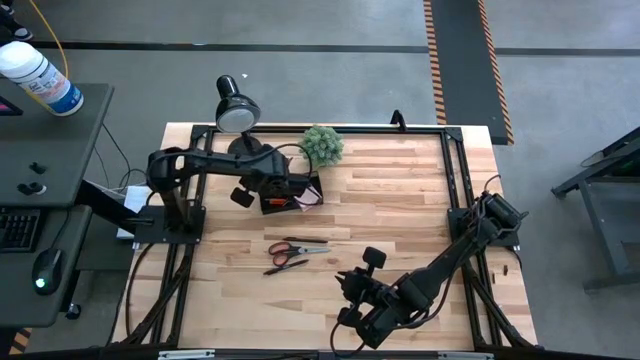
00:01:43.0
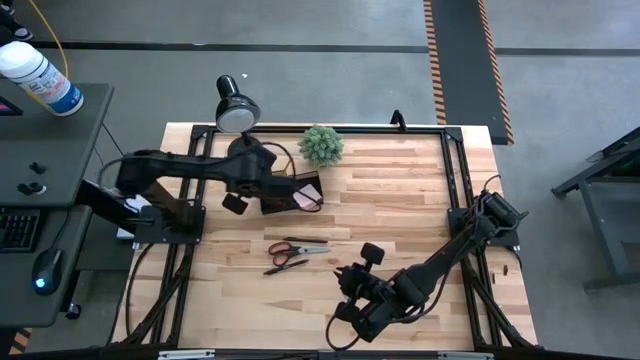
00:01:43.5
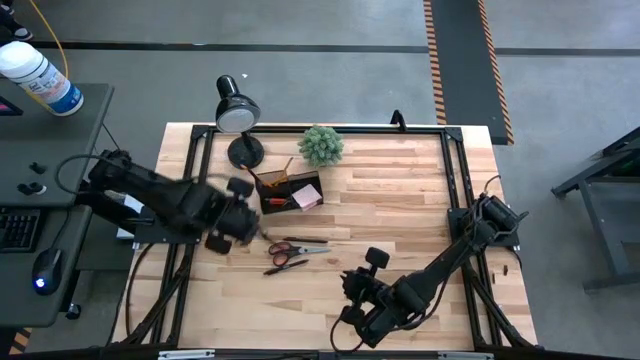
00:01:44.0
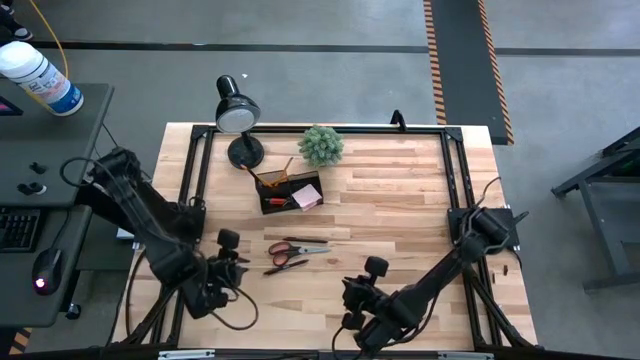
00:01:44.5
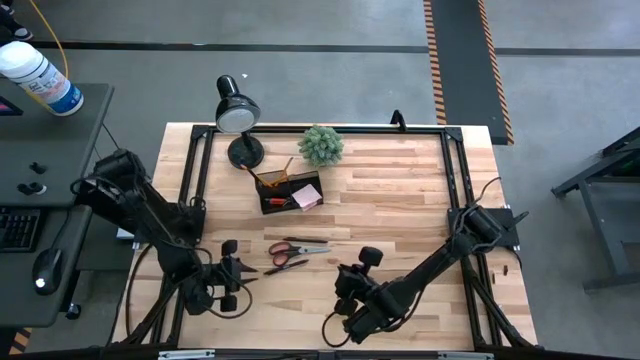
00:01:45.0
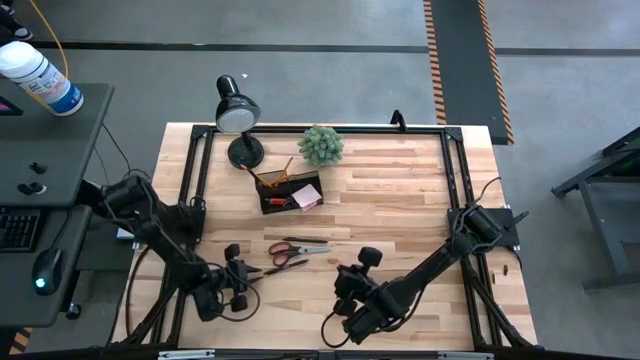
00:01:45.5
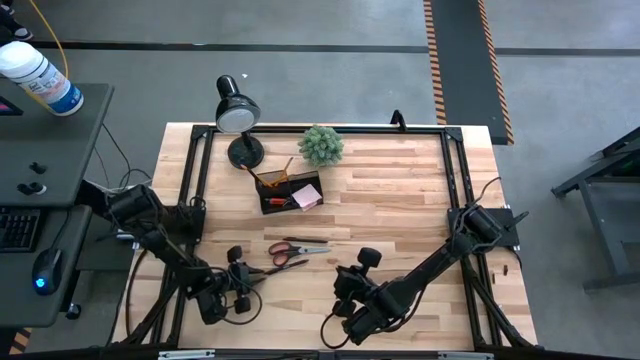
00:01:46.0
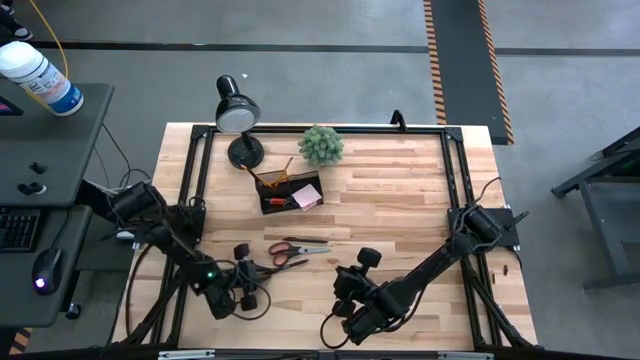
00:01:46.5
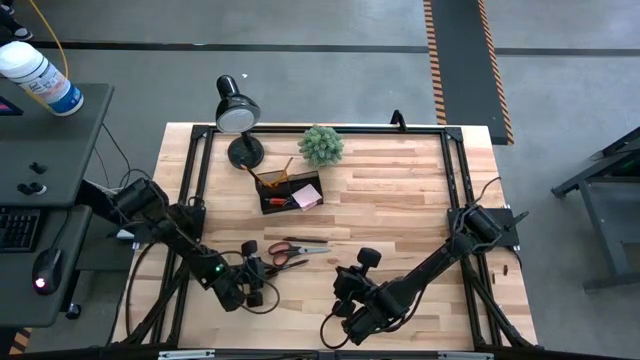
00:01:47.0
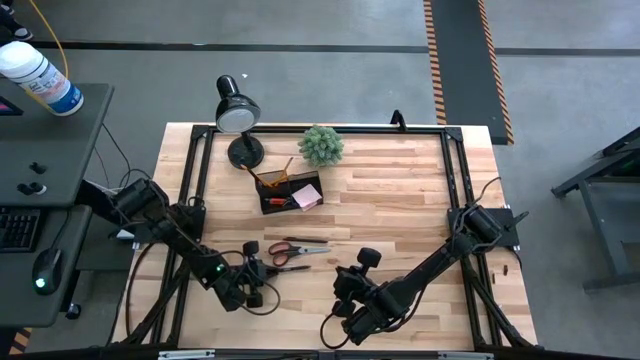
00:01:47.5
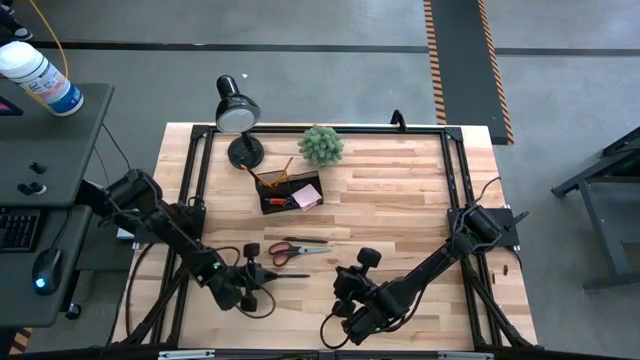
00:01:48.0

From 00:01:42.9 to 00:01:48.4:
Task: Pick and place office supplies into organizer
Put the bottom pen into the desktop organizer

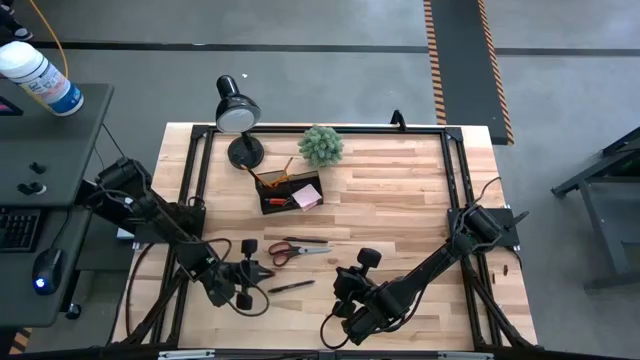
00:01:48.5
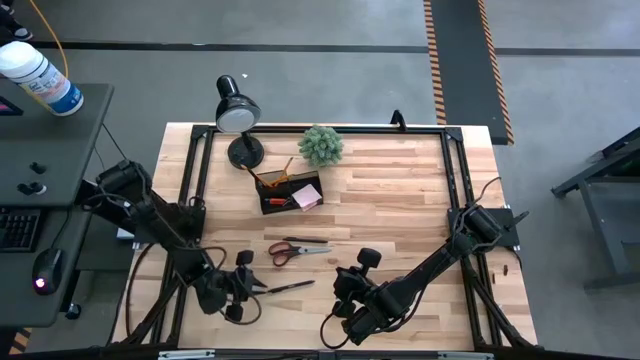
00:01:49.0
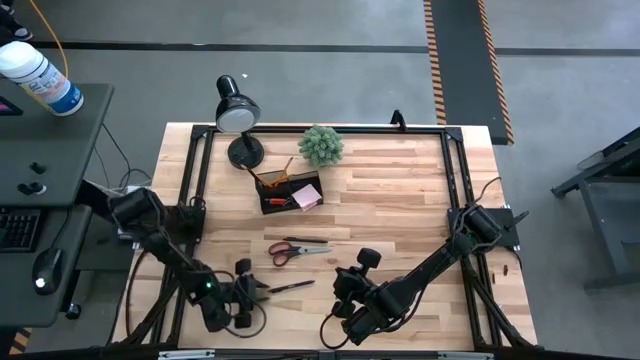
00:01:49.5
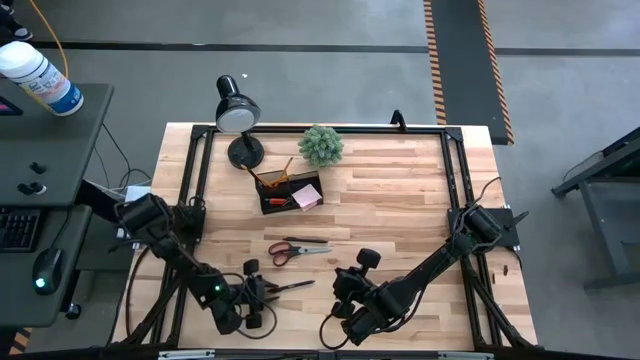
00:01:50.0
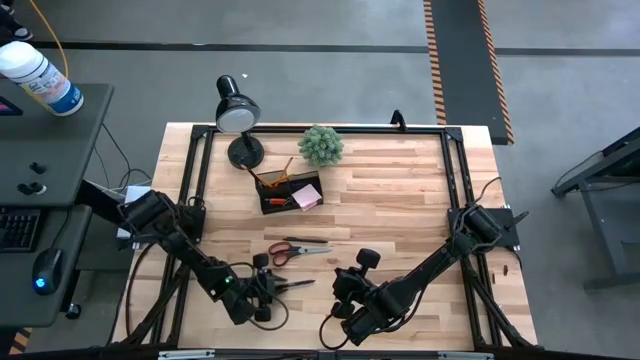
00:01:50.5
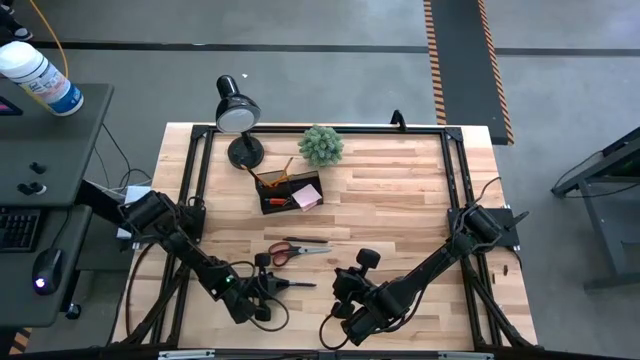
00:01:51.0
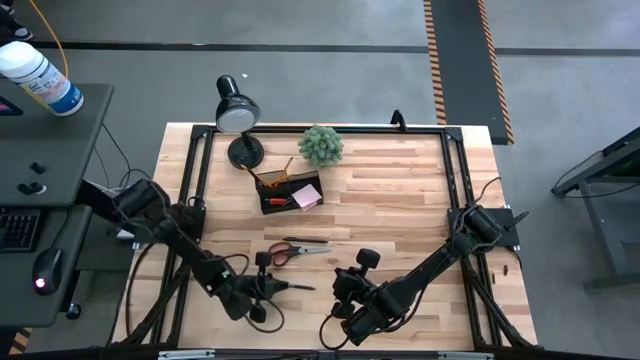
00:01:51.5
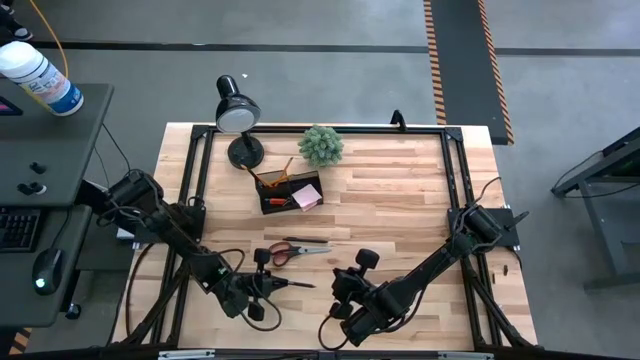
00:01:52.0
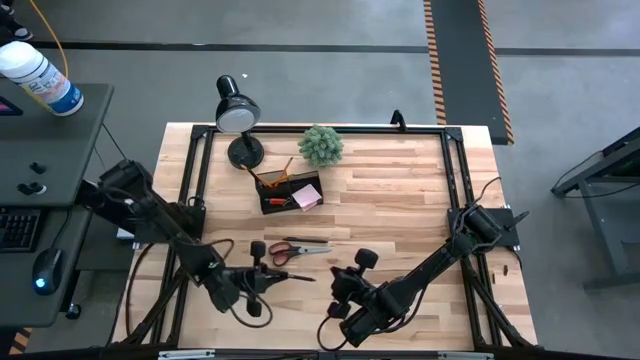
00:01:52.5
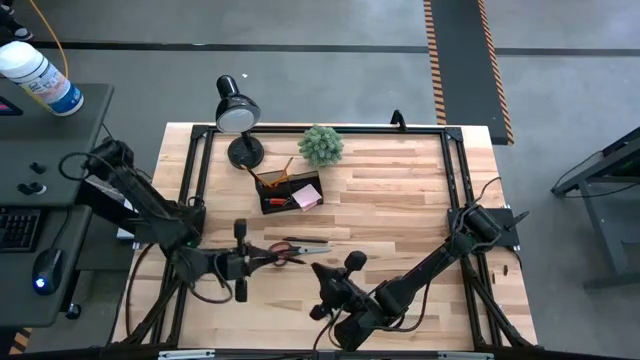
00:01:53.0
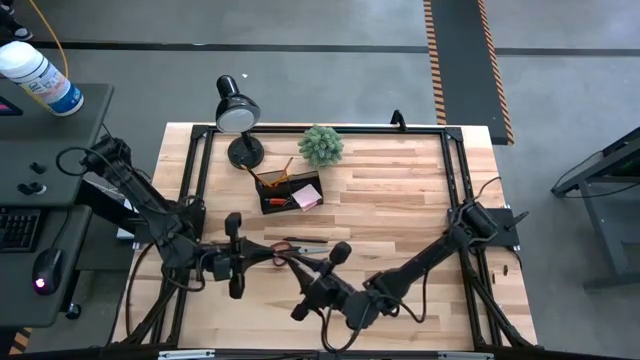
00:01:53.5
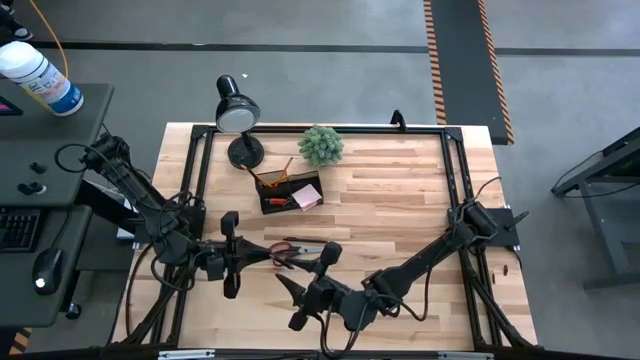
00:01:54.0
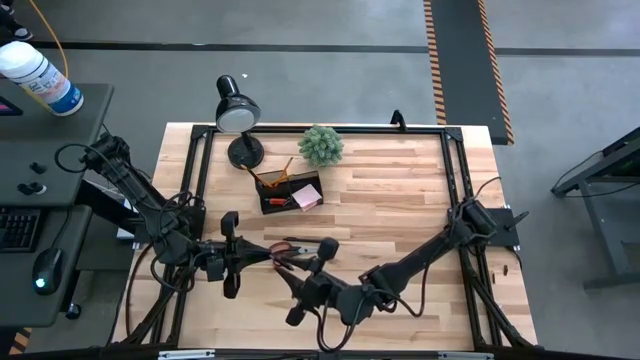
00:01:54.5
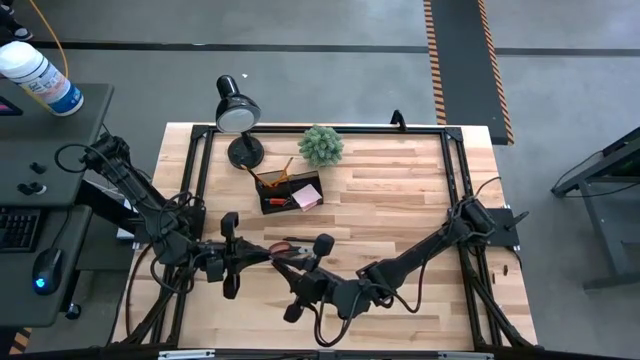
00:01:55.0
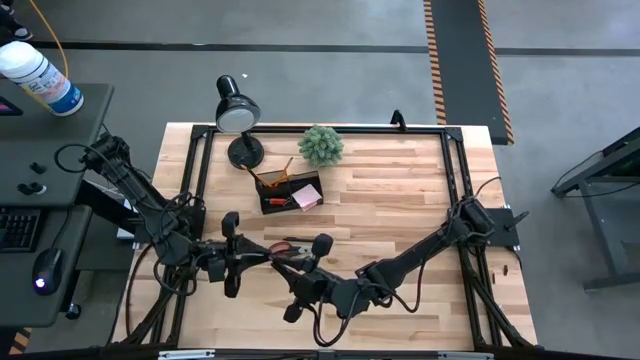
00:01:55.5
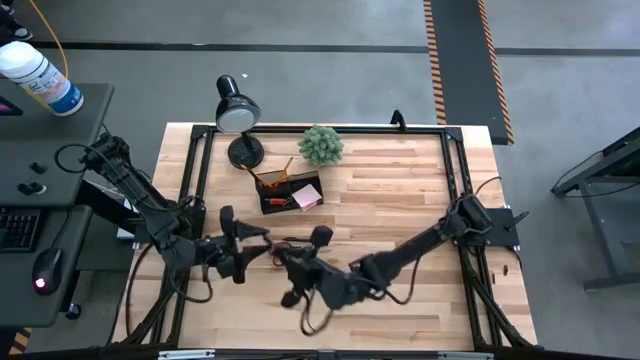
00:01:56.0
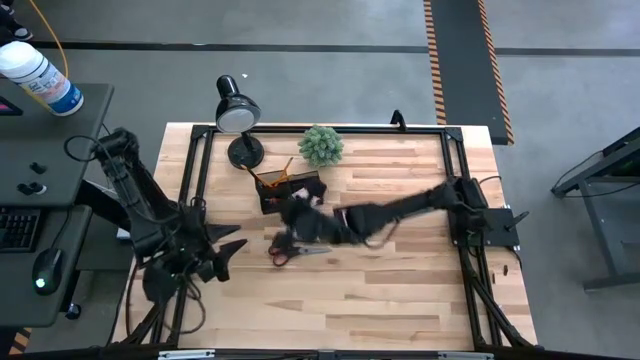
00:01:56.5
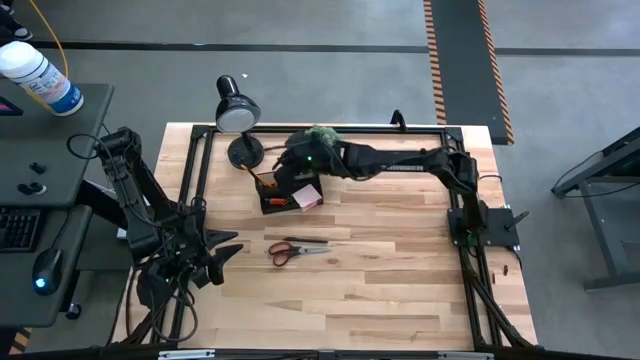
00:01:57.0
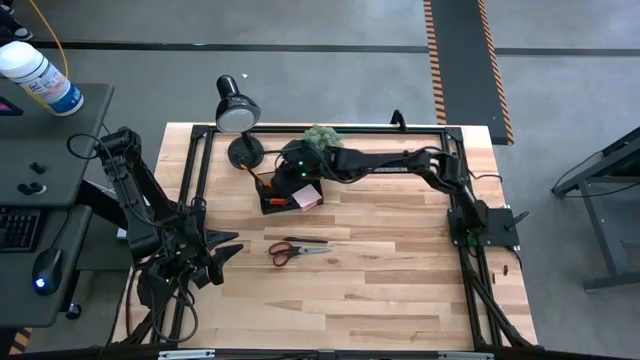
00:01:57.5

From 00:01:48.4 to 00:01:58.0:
Put the bottom pen into the desktop organizer

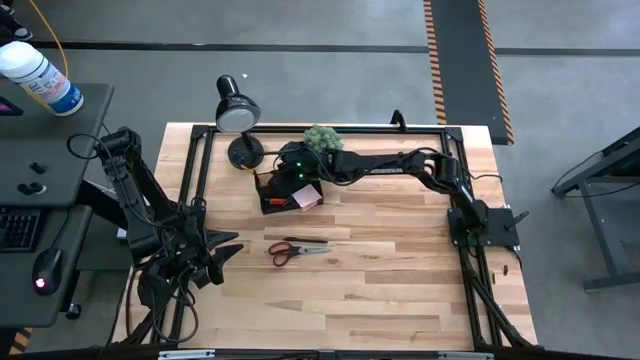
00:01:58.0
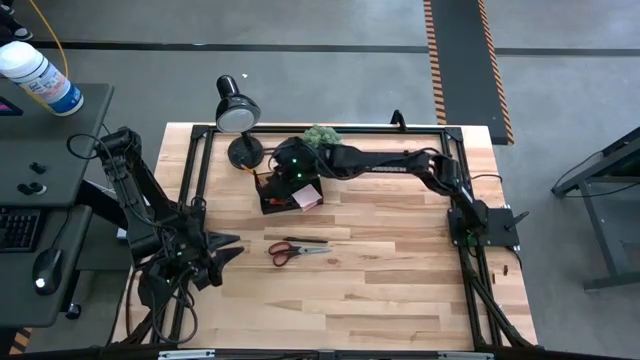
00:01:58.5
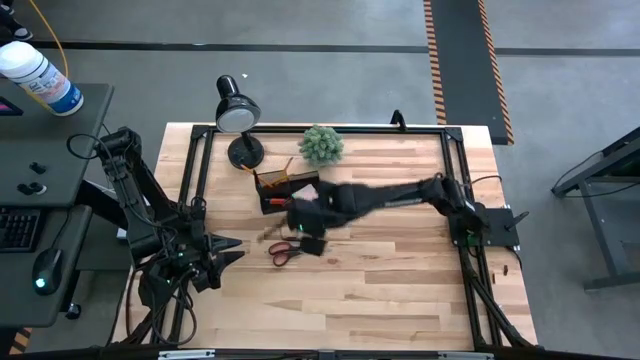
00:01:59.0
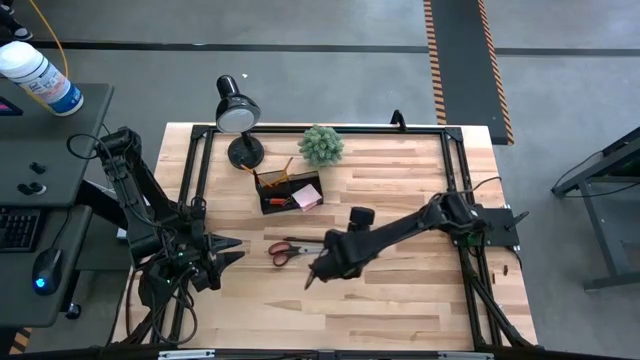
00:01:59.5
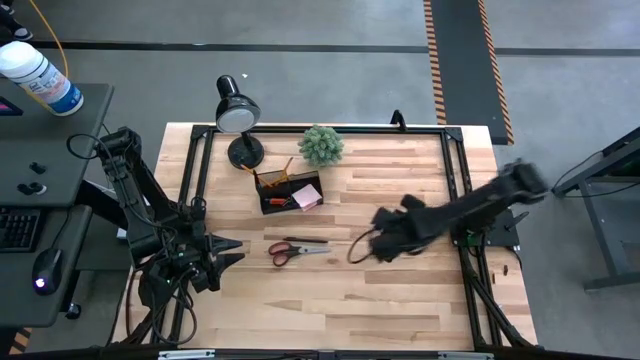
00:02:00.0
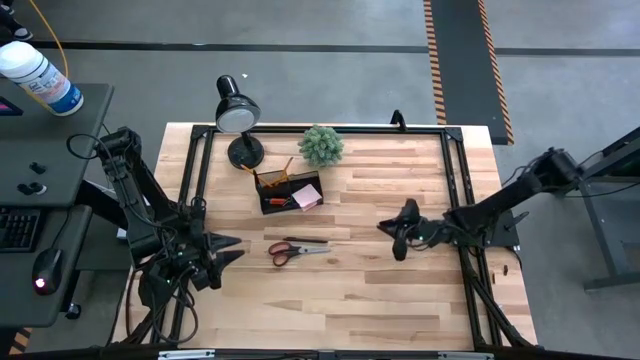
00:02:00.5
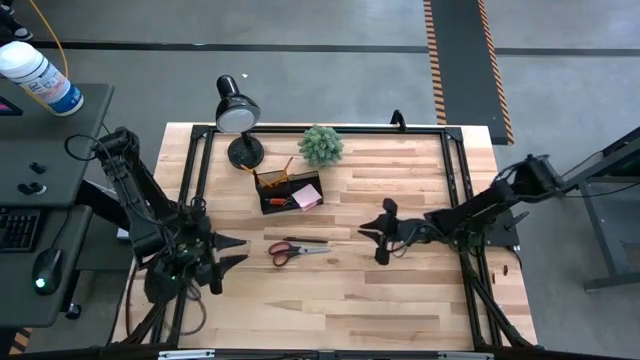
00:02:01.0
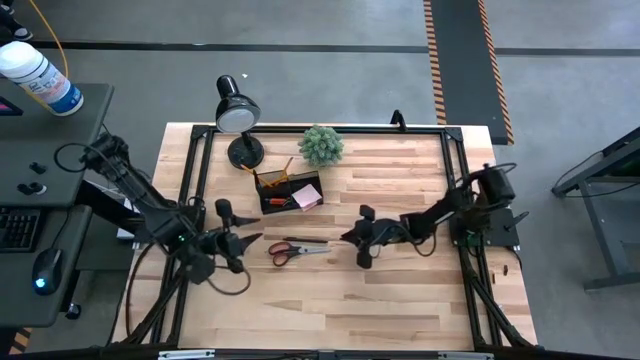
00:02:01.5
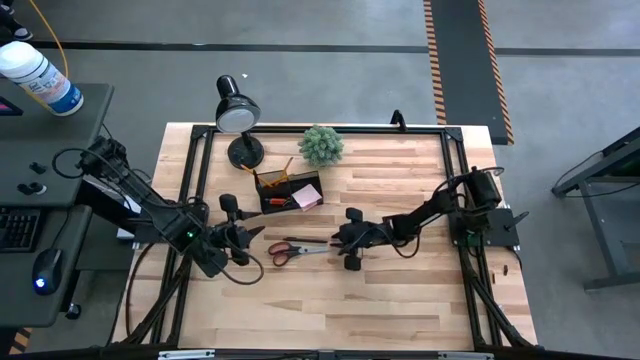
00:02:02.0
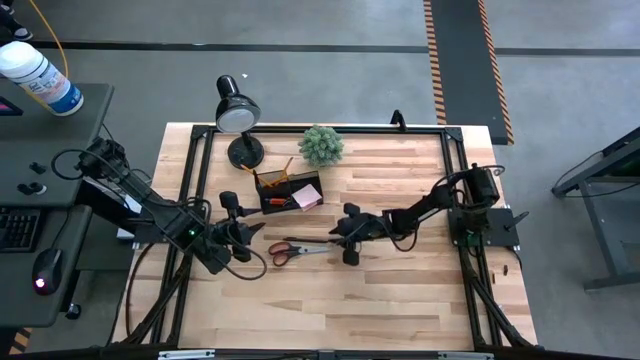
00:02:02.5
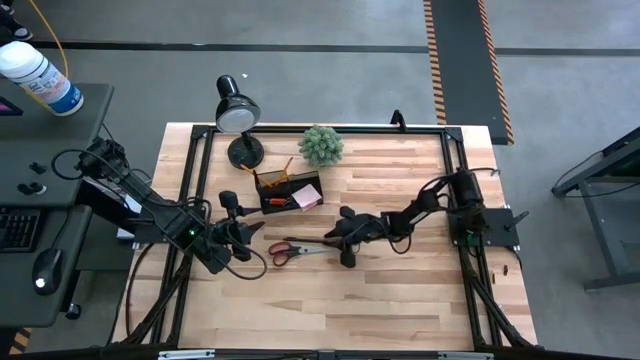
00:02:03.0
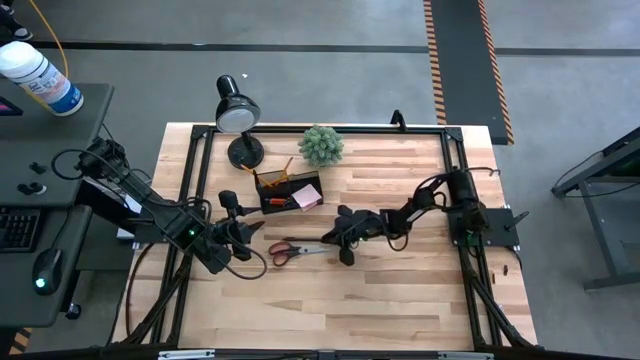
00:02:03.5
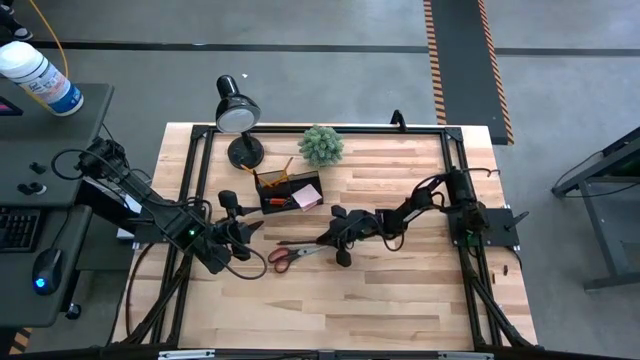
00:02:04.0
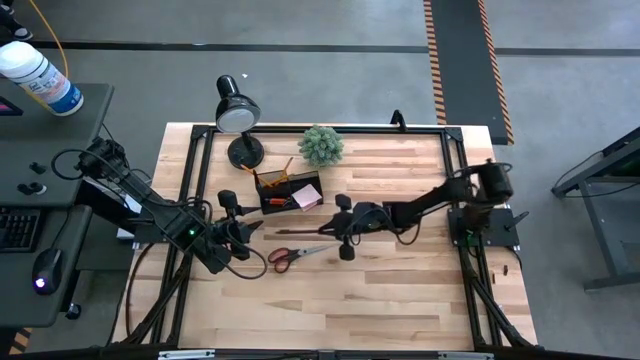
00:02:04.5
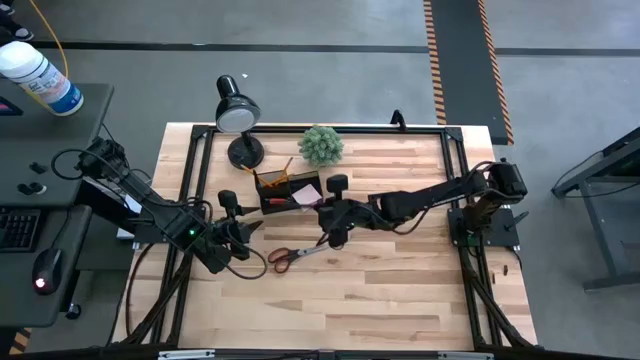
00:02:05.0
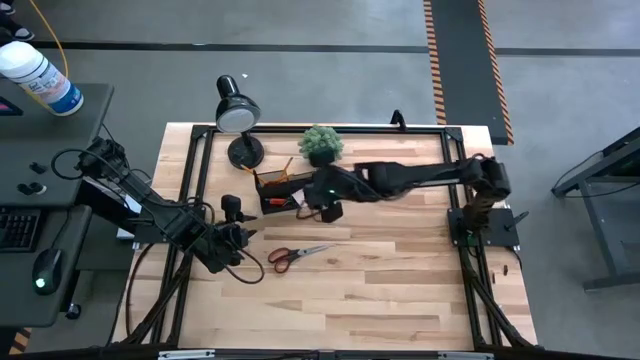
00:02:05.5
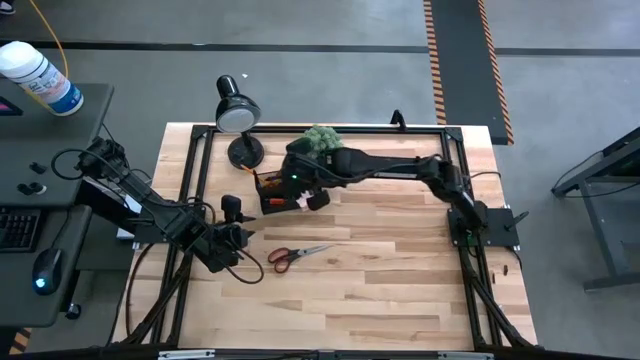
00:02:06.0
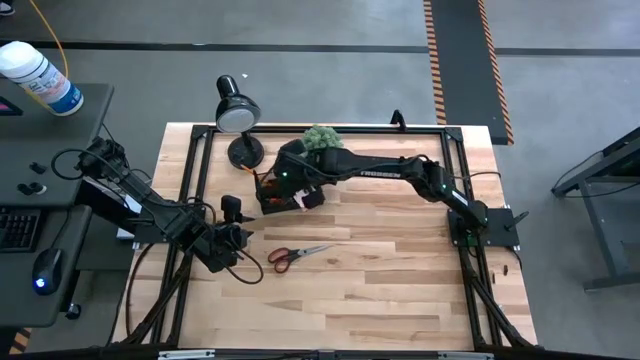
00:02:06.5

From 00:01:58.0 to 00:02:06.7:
Put the pen into the desktop organizer
